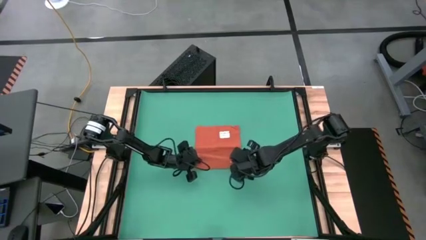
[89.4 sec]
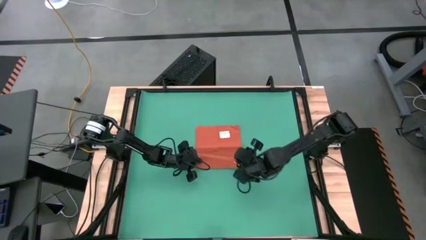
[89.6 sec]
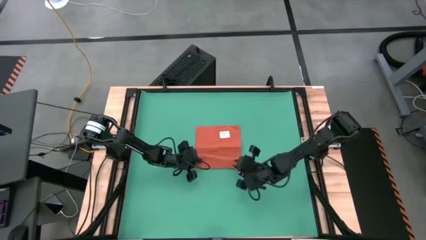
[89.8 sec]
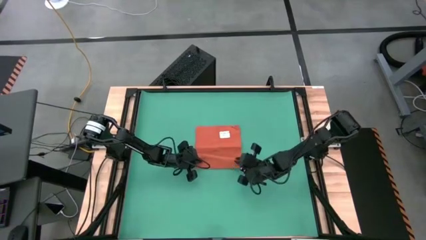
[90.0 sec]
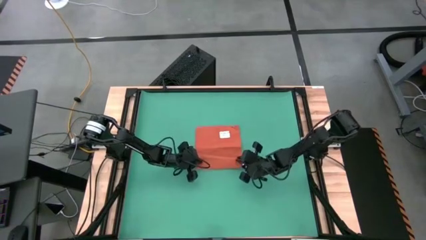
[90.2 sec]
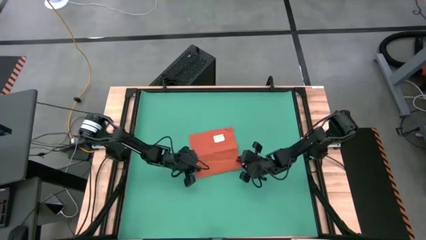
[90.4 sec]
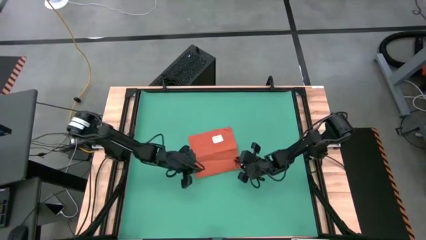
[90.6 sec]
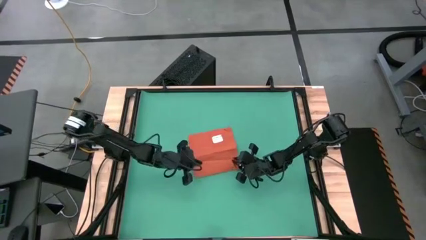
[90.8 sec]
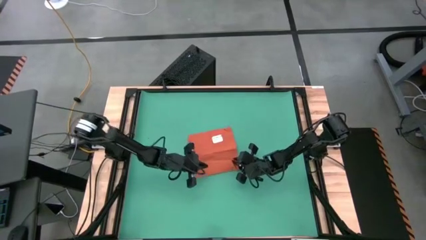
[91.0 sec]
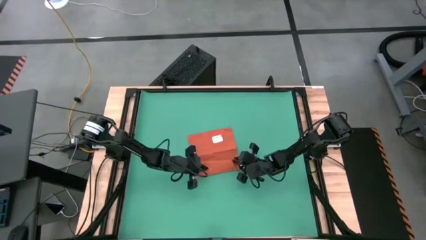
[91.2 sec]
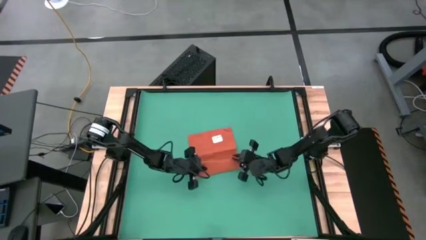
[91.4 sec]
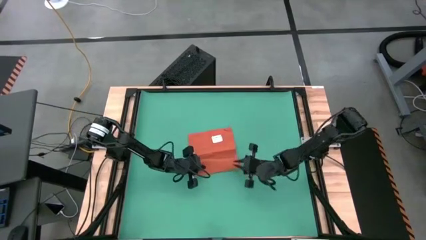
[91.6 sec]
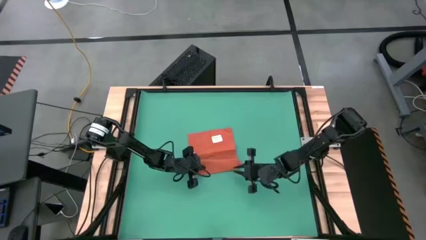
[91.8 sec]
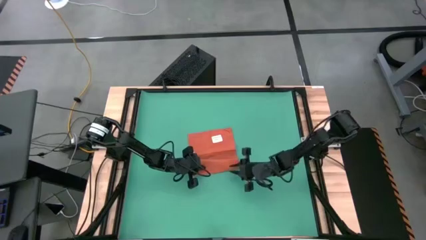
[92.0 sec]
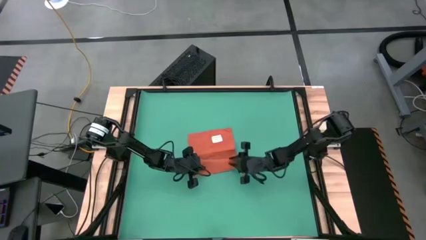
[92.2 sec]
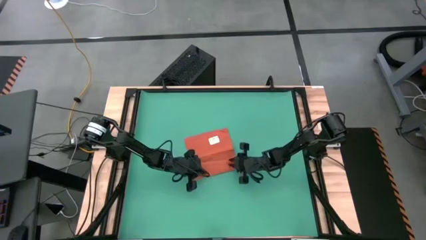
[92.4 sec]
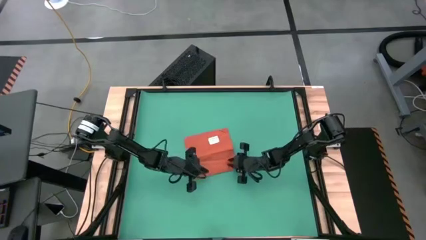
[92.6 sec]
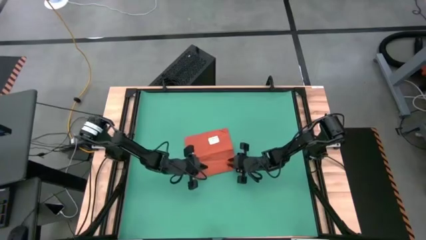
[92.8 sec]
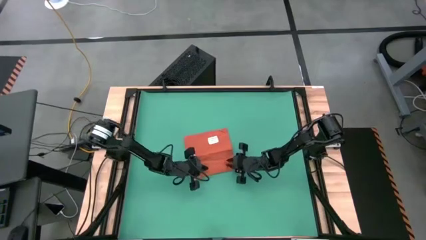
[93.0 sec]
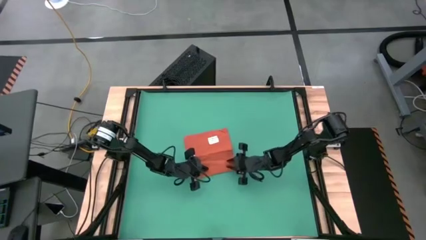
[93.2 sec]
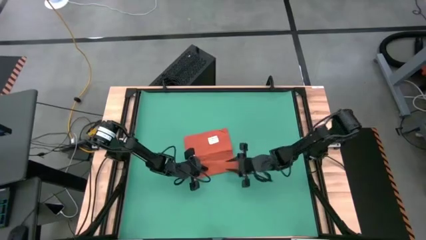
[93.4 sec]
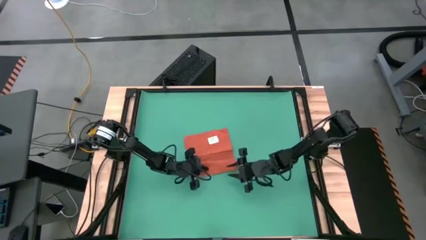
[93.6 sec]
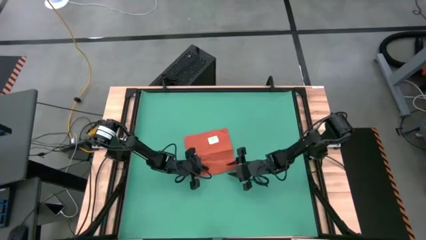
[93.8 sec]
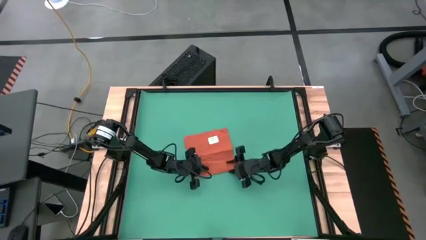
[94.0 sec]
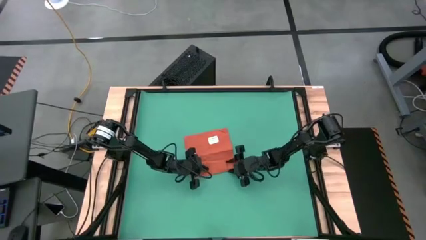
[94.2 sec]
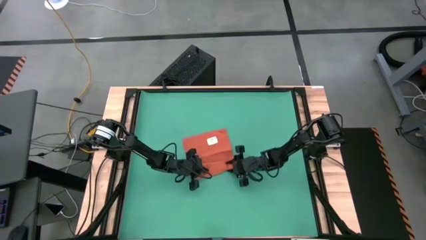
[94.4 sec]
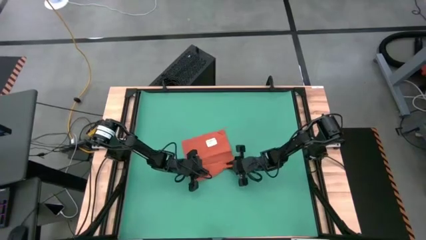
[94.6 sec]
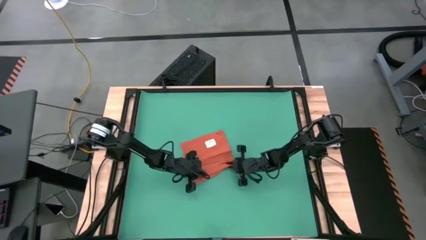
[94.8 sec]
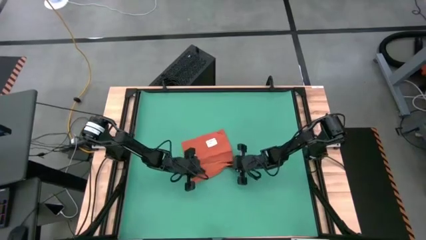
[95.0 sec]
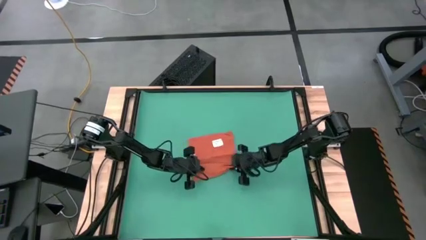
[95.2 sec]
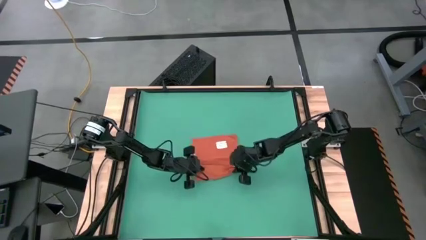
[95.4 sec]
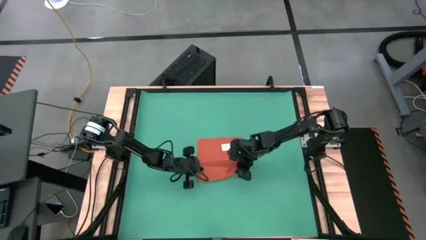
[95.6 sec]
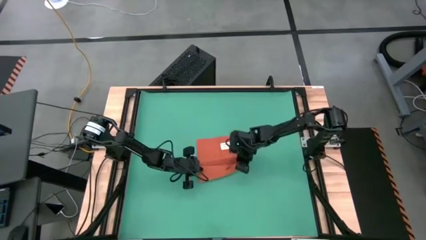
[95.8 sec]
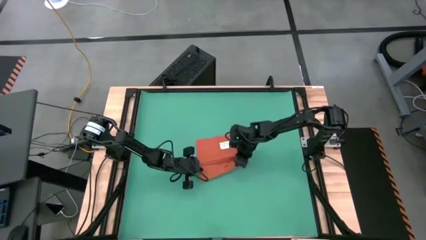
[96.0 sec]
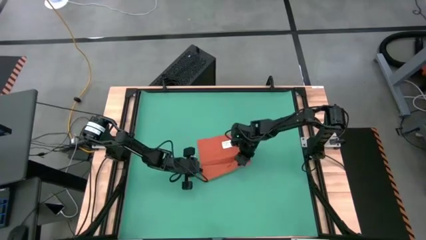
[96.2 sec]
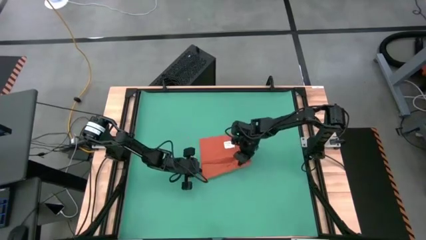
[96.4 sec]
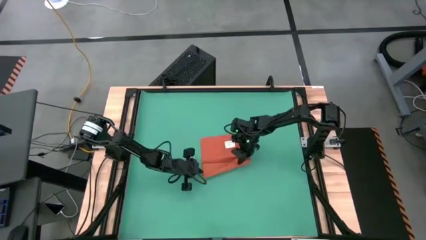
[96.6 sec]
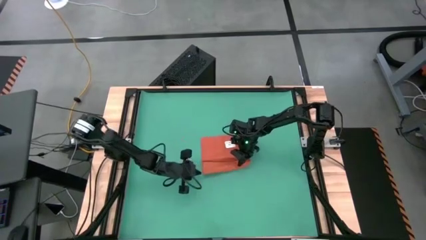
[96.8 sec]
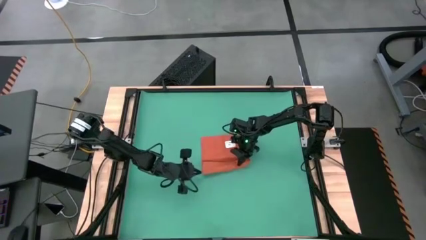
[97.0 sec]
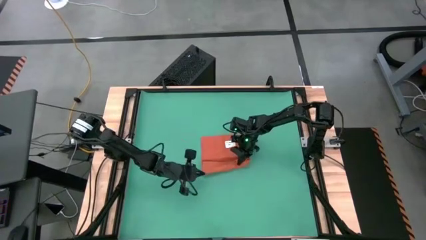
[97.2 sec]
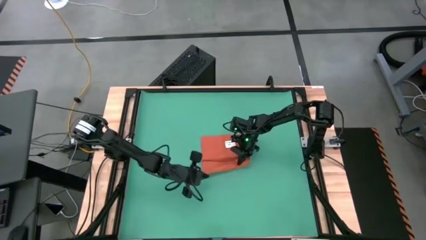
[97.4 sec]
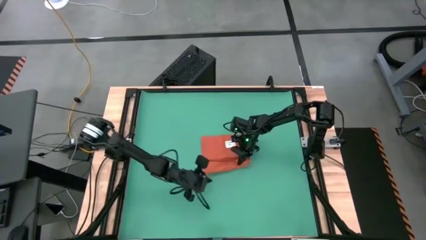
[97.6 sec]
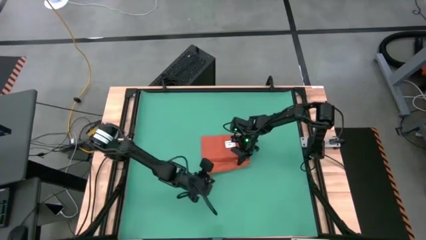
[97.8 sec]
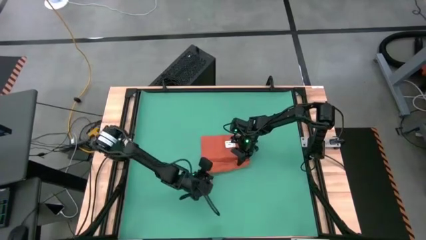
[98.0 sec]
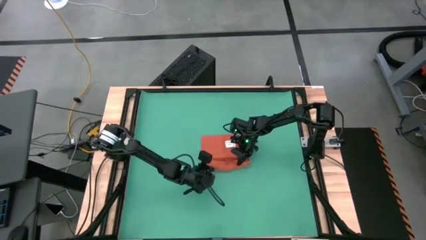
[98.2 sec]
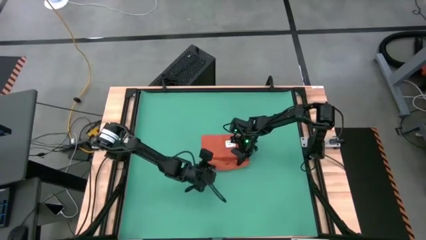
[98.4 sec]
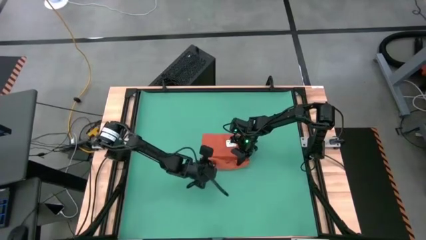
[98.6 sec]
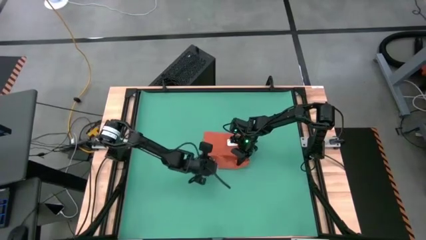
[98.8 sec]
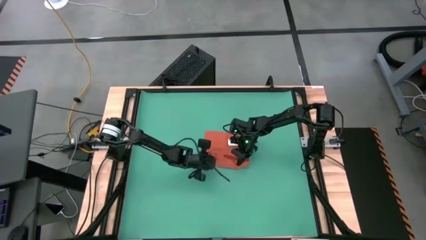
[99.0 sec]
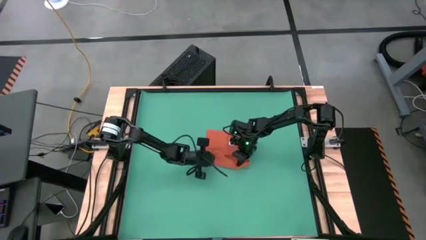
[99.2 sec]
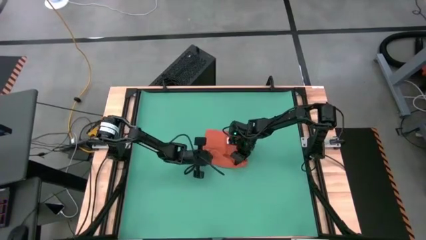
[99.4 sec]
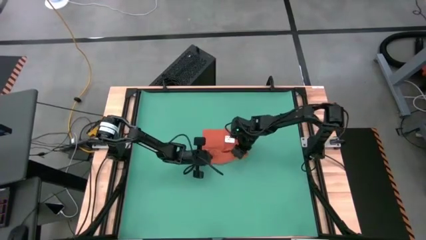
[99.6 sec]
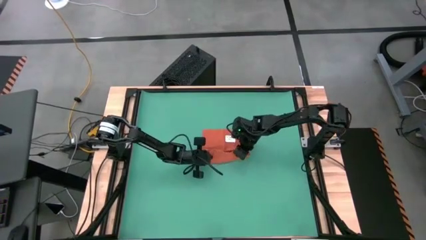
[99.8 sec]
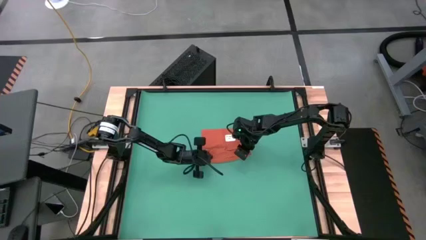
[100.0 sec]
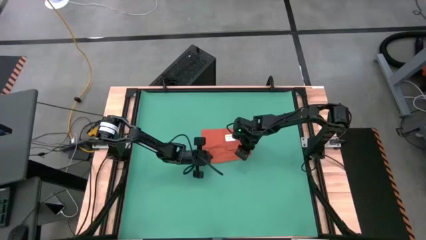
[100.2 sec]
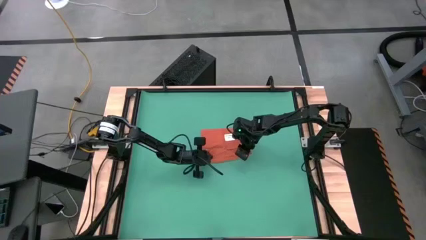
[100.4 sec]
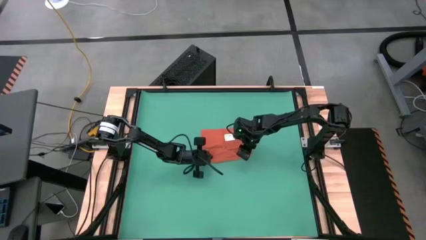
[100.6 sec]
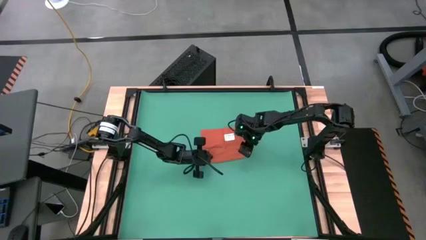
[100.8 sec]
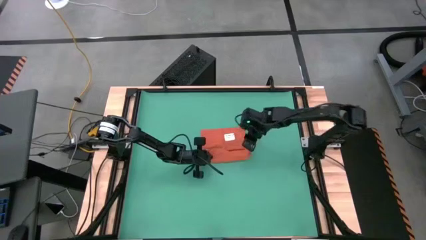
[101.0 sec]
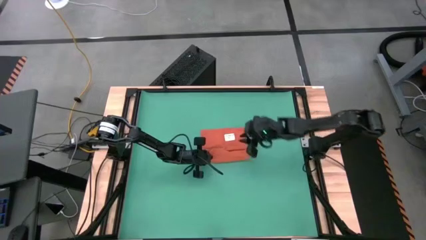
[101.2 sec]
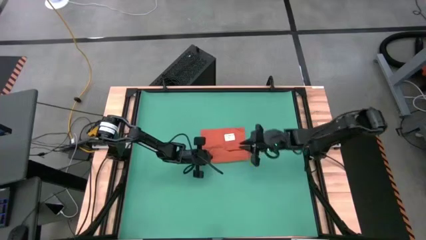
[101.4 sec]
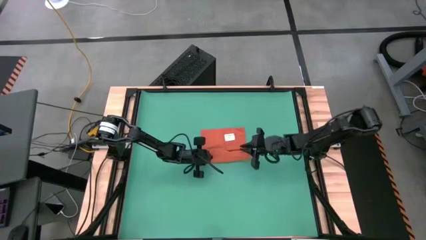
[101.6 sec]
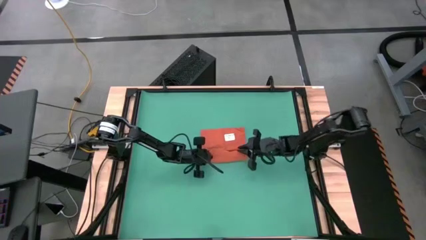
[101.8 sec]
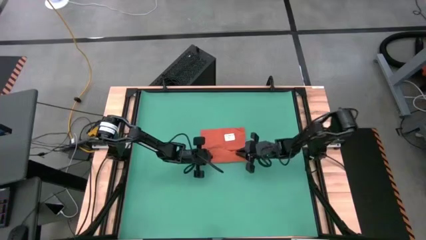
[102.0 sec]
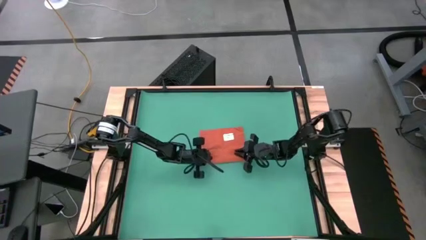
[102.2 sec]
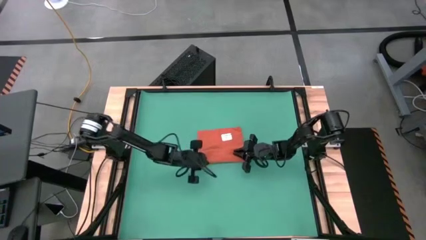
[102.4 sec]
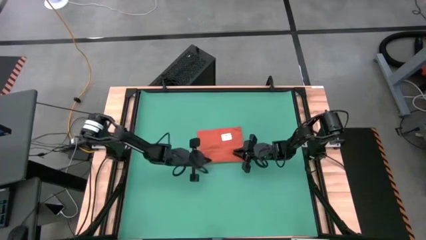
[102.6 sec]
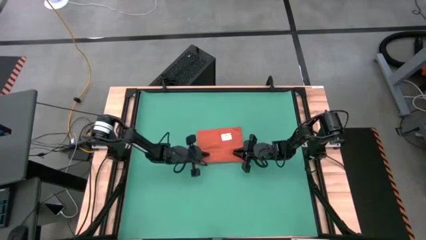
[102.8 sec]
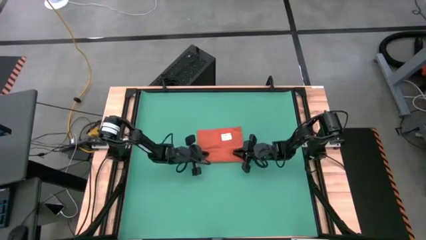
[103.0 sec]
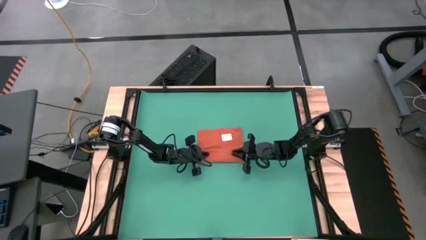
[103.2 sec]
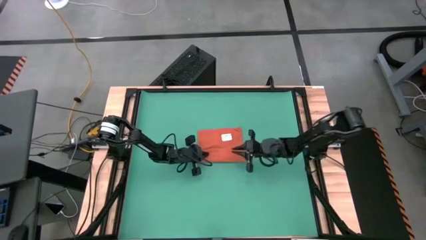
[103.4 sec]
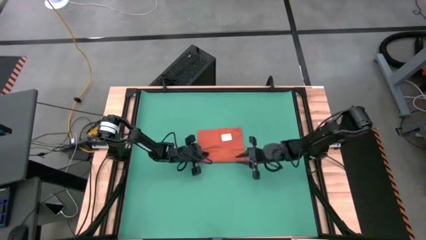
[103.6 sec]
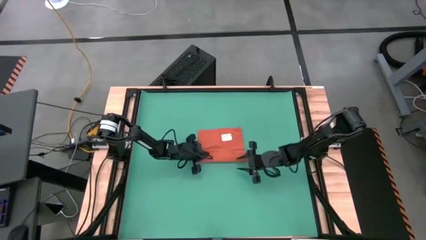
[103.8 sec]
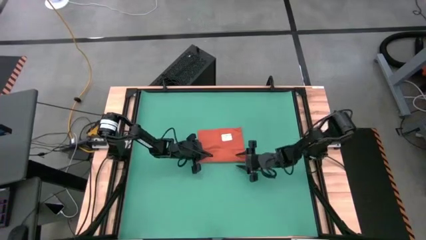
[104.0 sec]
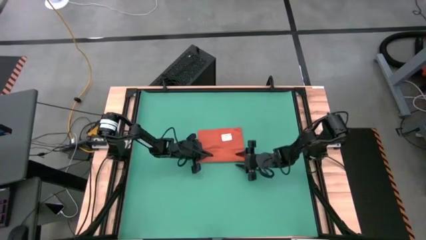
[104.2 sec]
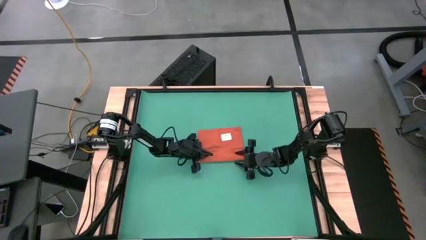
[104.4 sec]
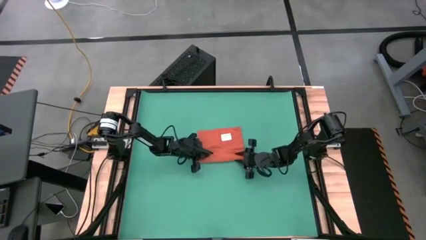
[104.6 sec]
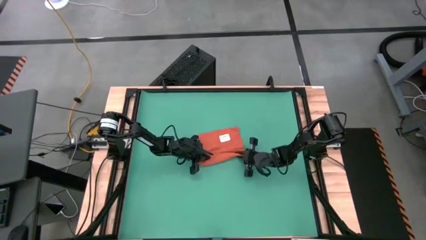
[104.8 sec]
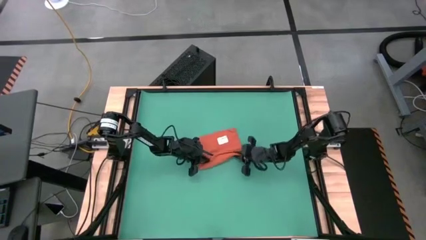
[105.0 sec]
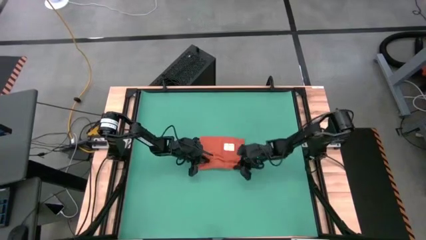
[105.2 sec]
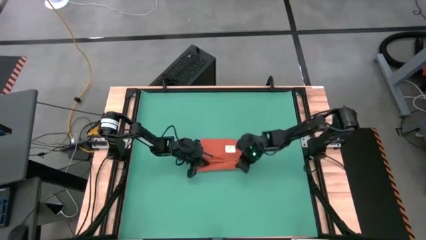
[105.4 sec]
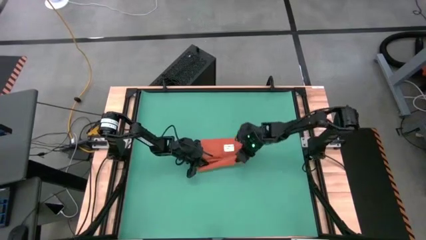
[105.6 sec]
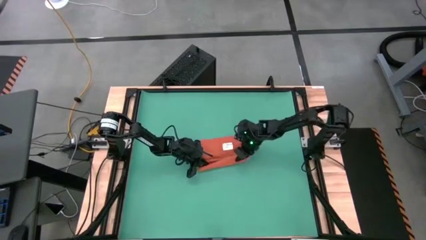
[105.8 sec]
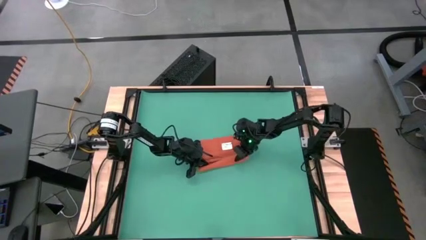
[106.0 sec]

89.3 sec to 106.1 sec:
Task: Roll towel
Roll the orange towel
